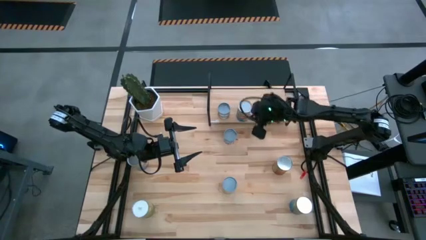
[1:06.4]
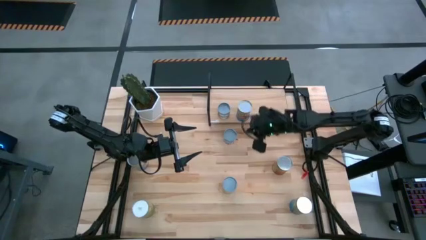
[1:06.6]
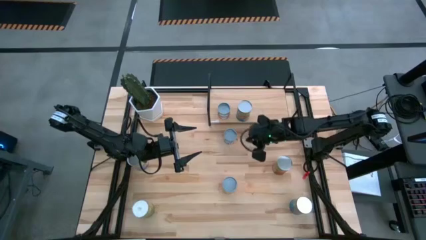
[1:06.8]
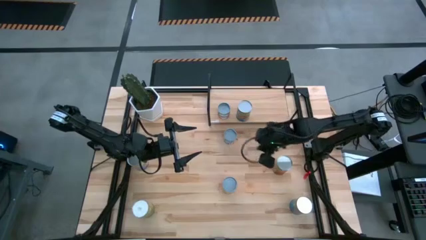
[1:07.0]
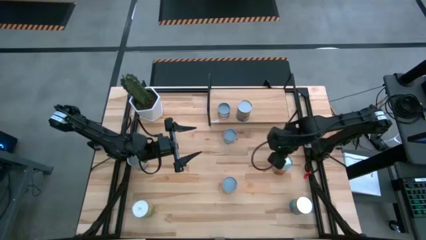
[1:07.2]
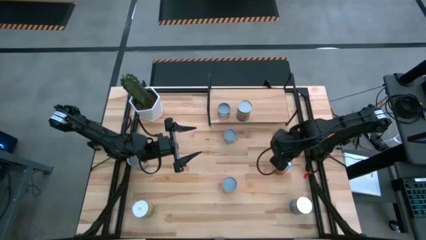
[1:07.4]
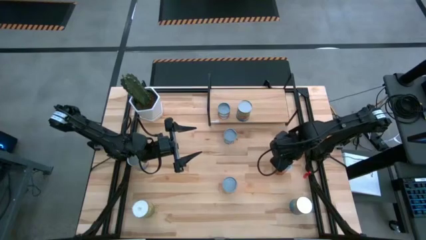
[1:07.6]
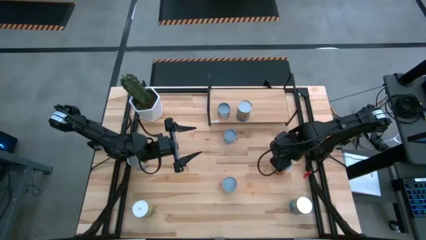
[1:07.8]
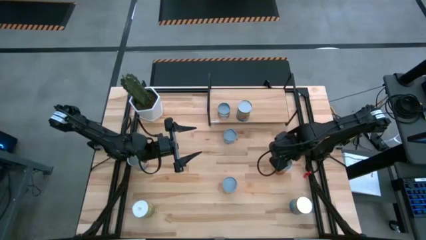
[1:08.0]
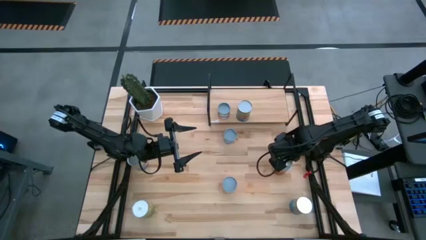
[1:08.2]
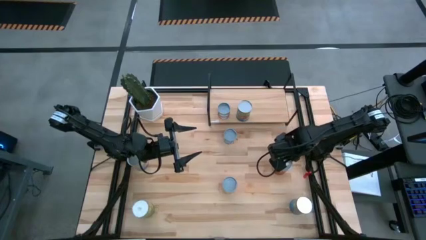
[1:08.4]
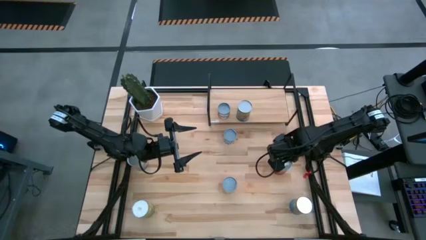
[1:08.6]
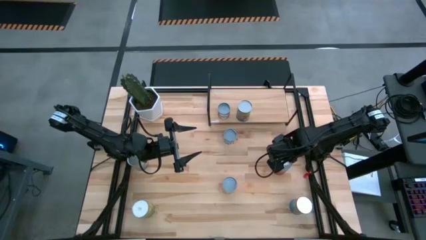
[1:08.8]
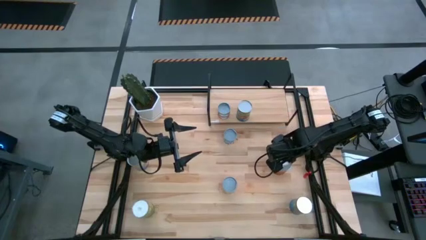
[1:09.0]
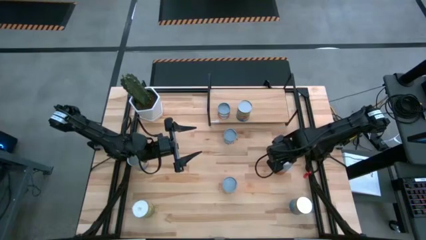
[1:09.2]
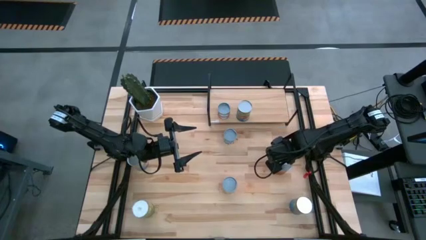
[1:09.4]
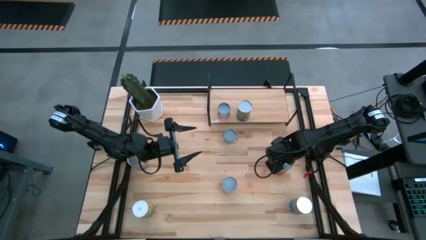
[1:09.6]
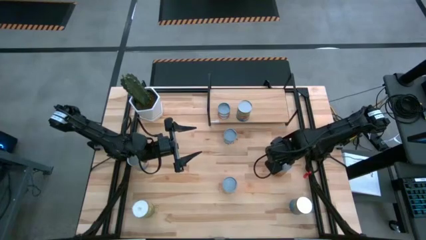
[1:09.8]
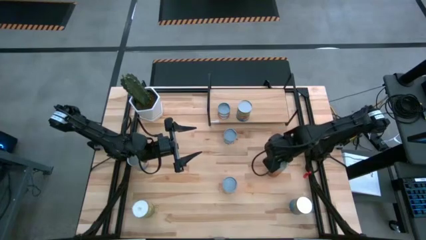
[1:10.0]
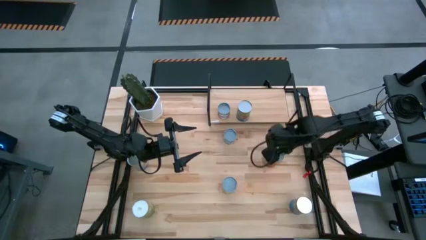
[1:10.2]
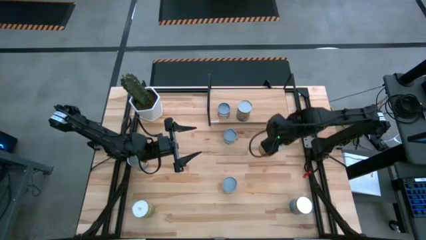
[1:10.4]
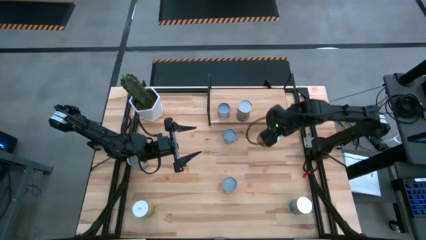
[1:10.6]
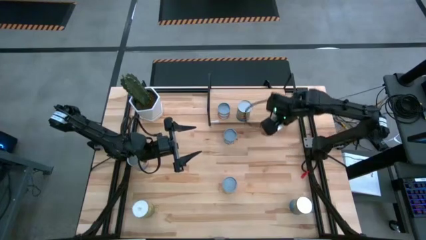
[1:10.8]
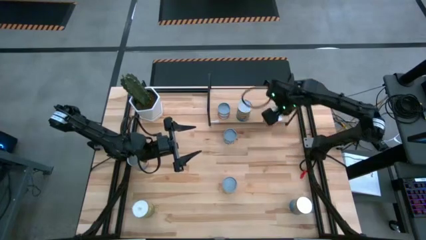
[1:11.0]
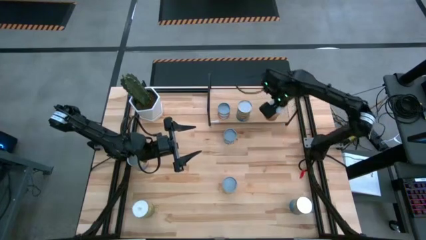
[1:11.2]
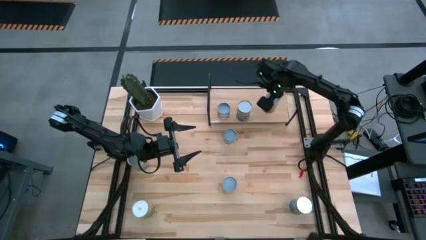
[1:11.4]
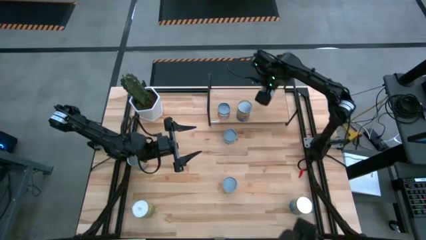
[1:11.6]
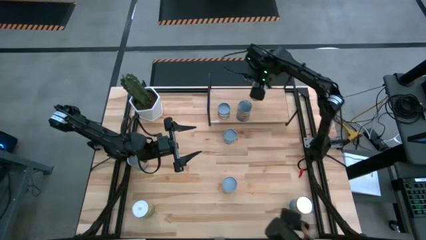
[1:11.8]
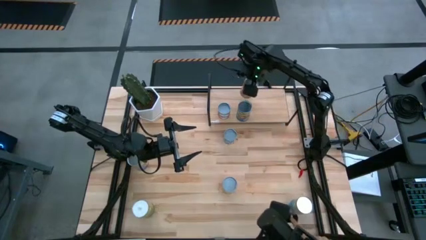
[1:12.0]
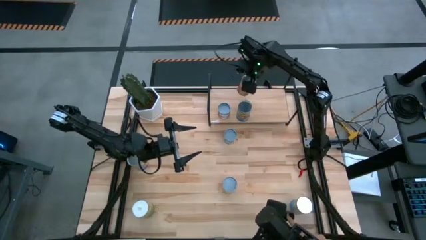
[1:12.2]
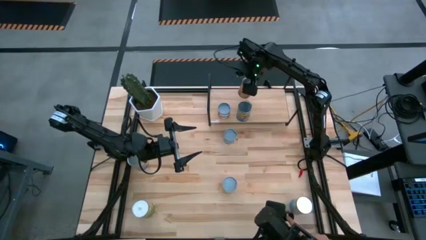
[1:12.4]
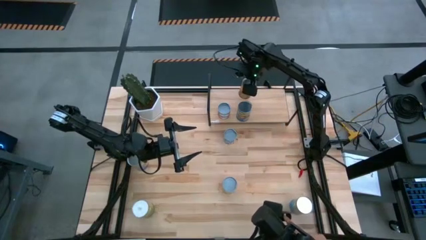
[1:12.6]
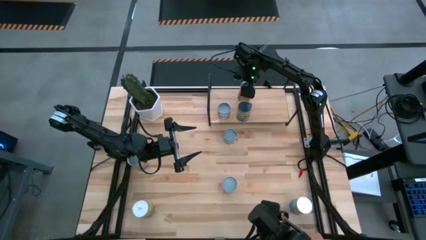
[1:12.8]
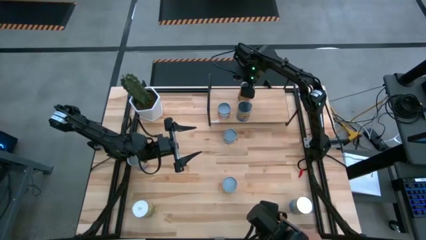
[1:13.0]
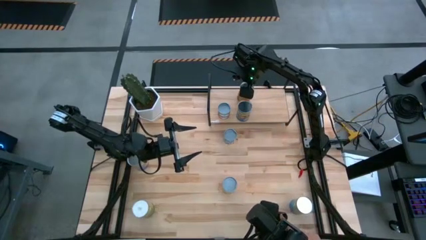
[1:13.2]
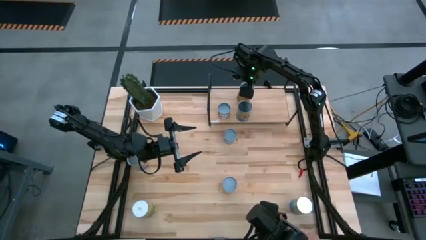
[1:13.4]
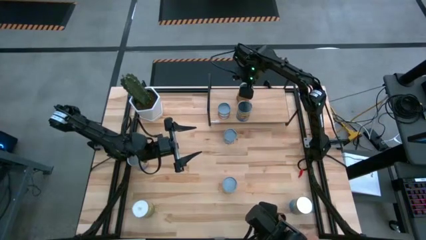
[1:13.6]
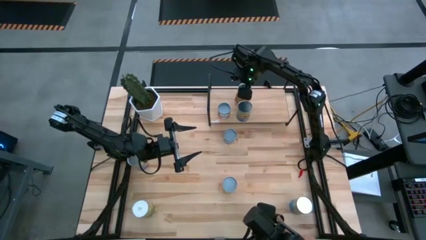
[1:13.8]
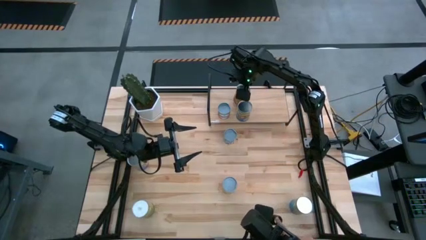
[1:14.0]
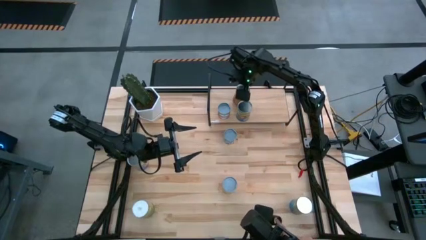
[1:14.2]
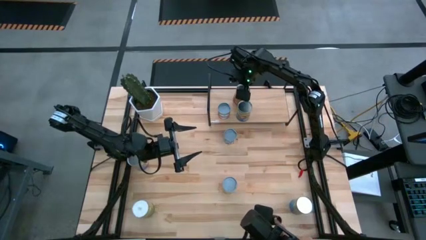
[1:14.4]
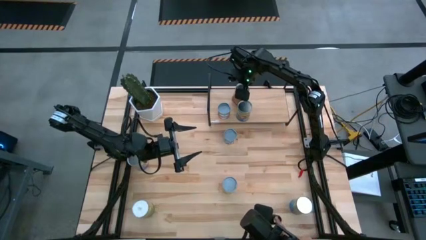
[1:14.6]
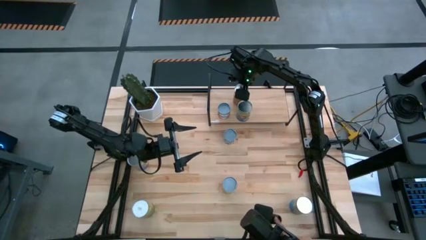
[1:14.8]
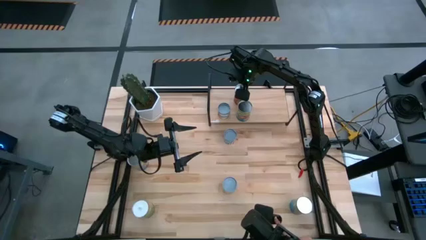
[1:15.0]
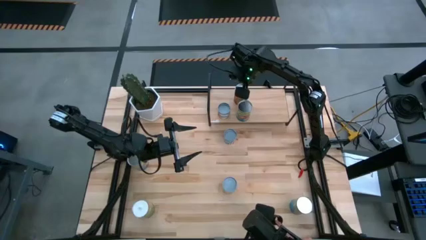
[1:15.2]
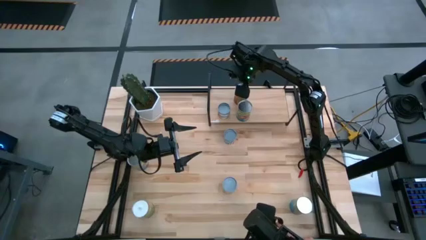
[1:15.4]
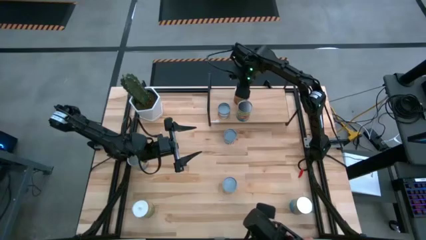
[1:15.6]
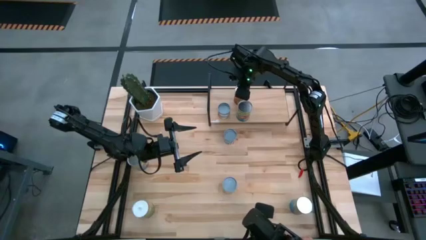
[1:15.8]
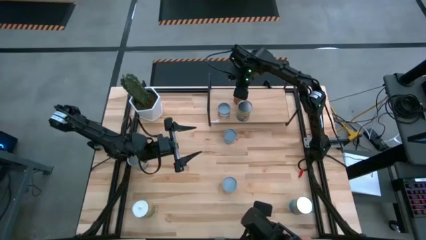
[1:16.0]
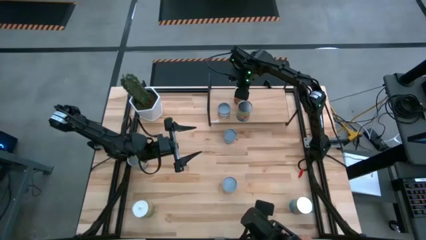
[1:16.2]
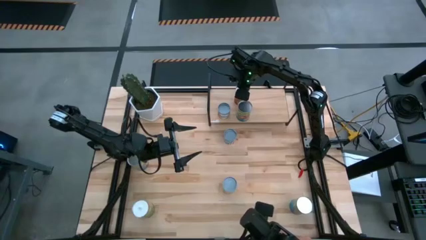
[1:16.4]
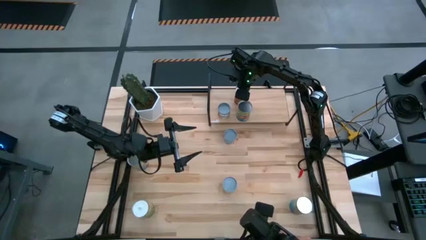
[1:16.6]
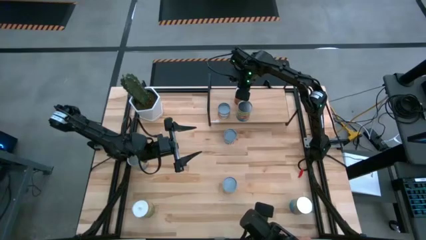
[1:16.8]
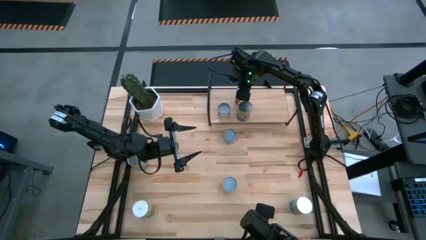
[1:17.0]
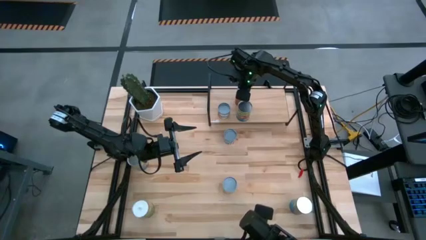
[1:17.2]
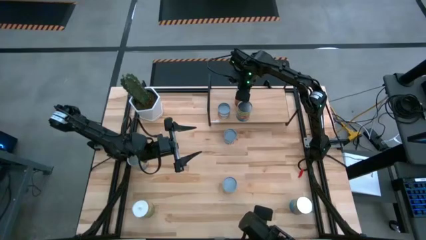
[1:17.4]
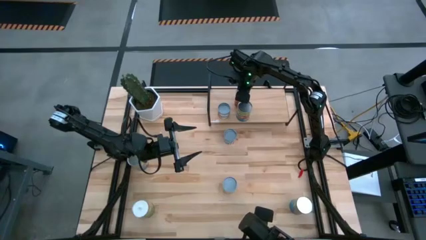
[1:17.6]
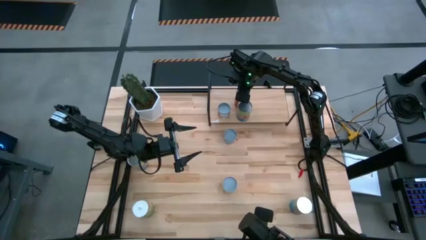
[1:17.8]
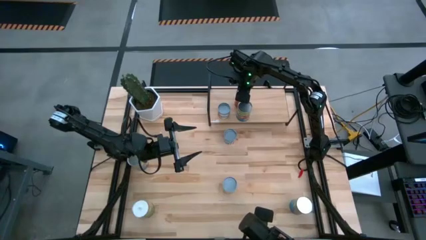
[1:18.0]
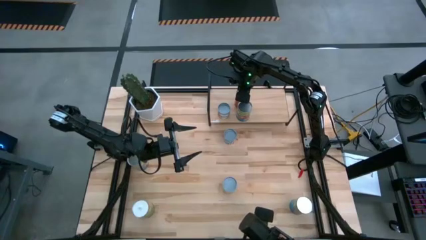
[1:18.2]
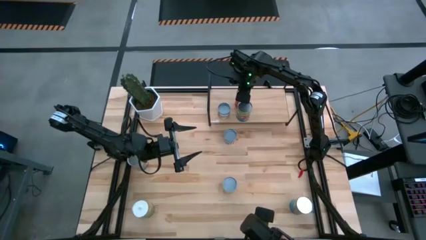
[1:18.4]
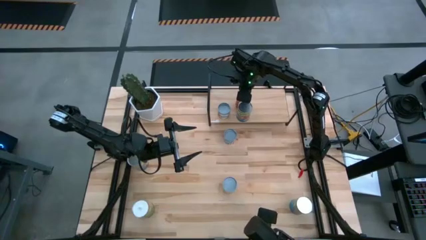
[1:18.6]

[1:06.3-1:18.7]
Task: Pick and place cans onto a shelf
Put the canned pineapples on the shelf
